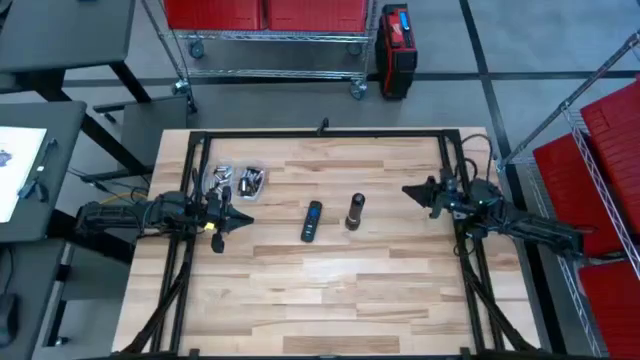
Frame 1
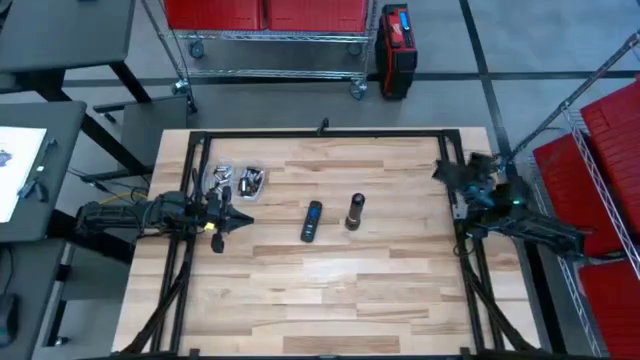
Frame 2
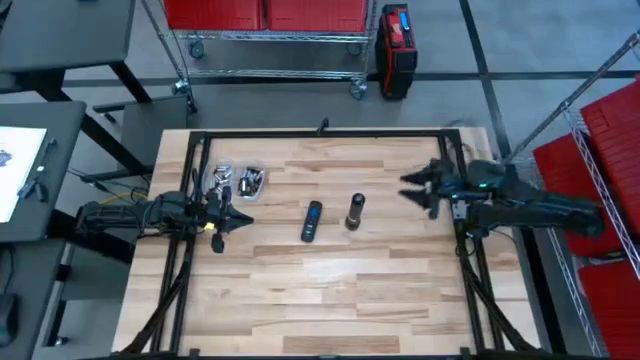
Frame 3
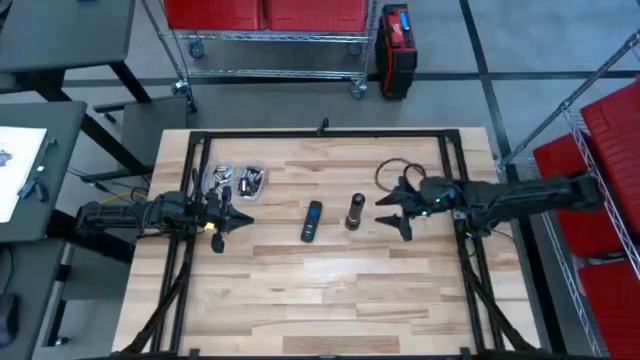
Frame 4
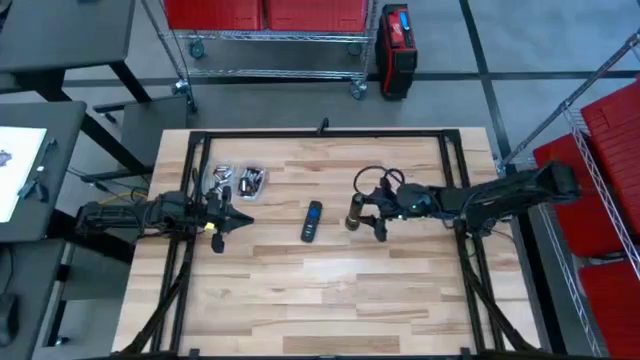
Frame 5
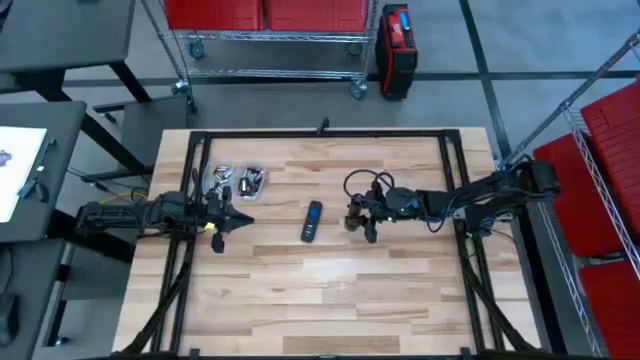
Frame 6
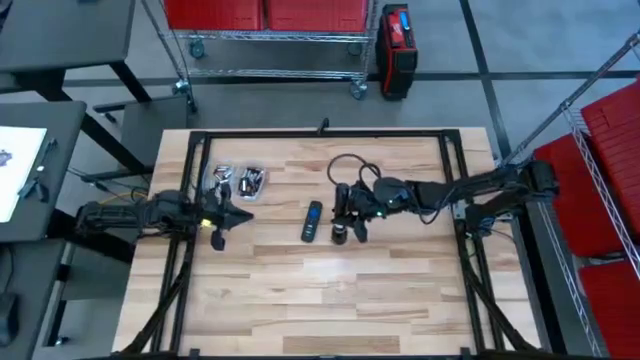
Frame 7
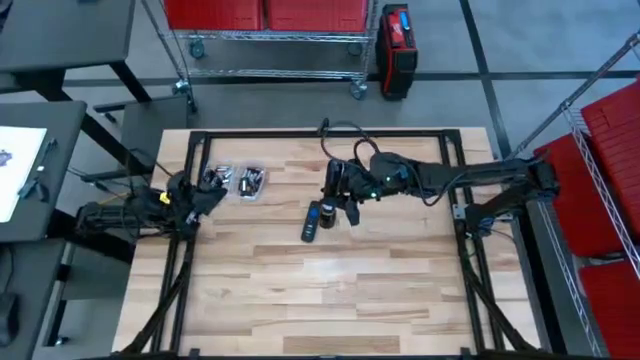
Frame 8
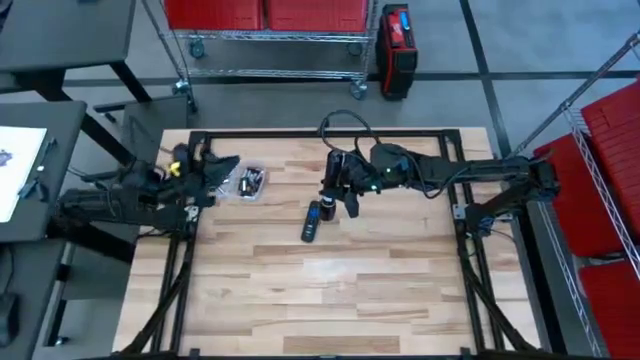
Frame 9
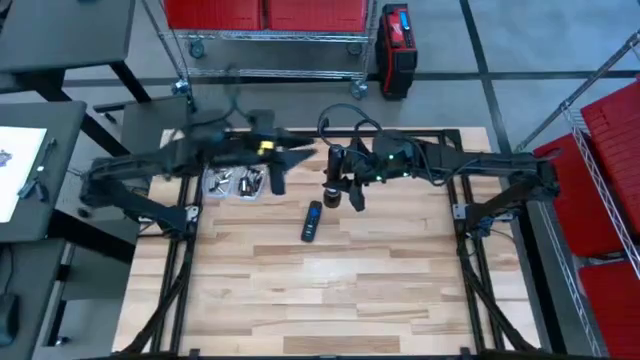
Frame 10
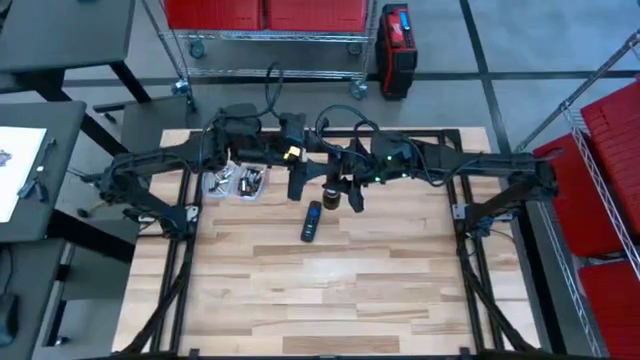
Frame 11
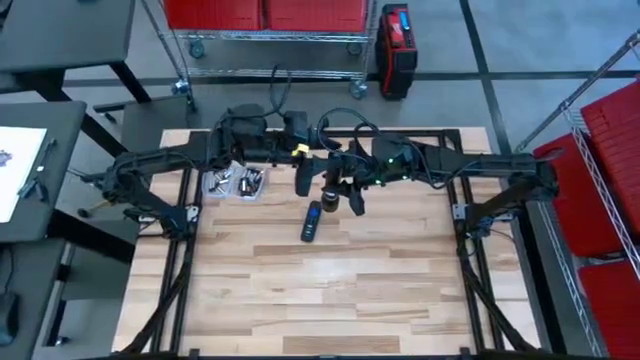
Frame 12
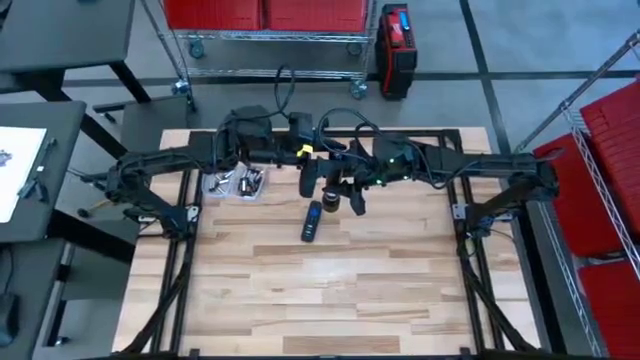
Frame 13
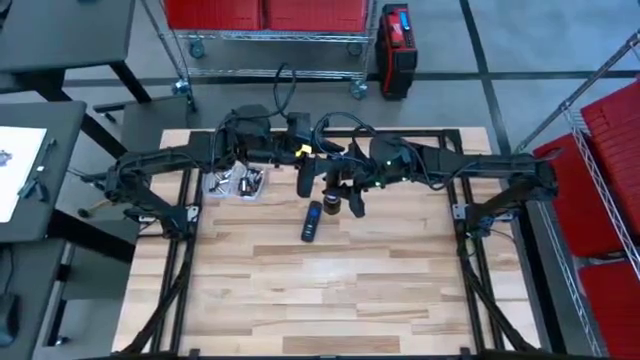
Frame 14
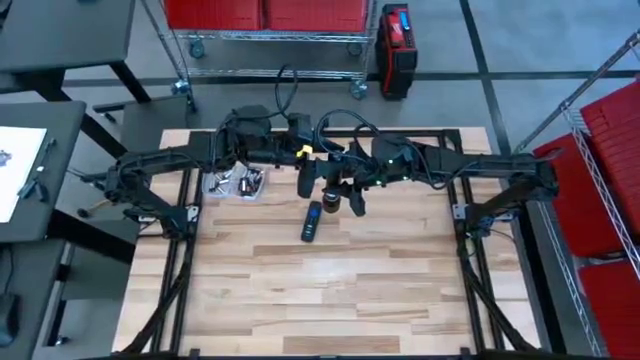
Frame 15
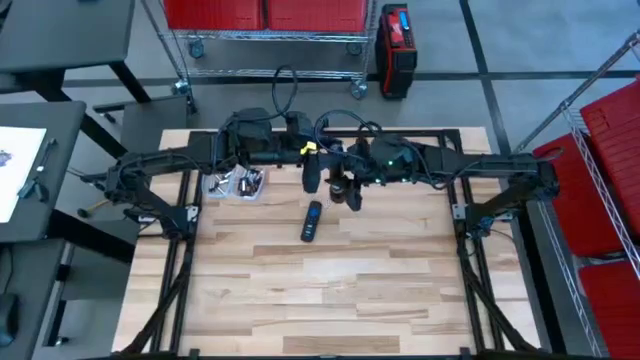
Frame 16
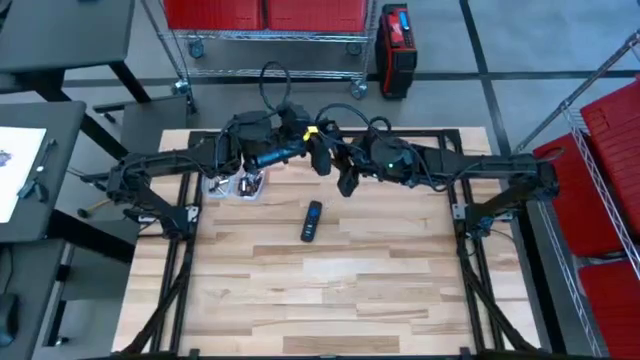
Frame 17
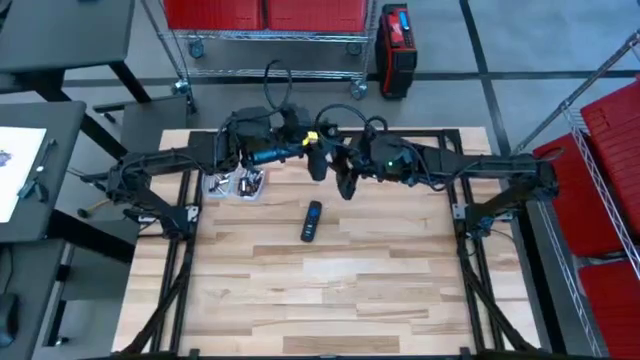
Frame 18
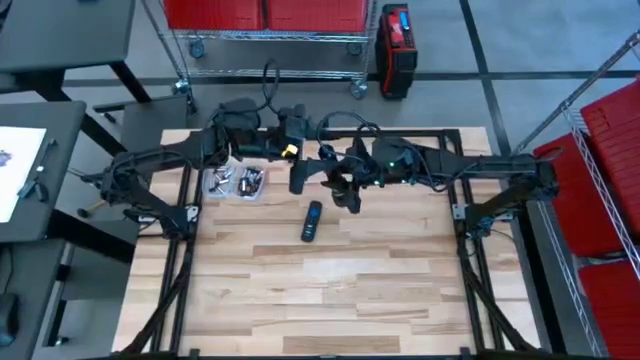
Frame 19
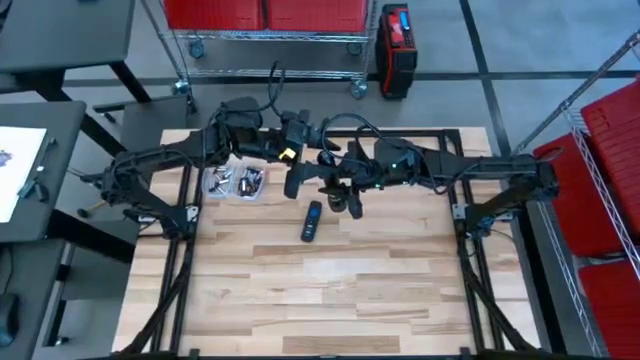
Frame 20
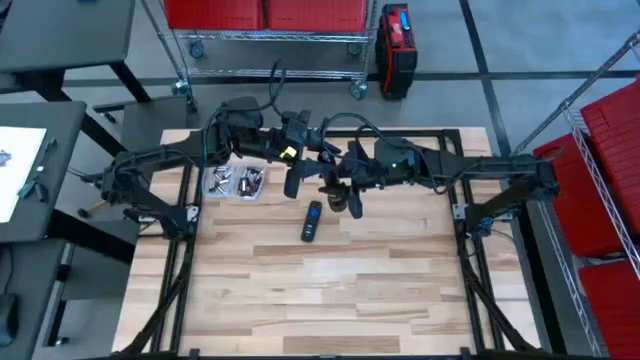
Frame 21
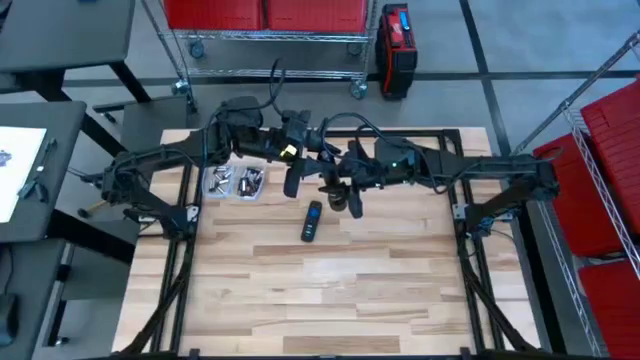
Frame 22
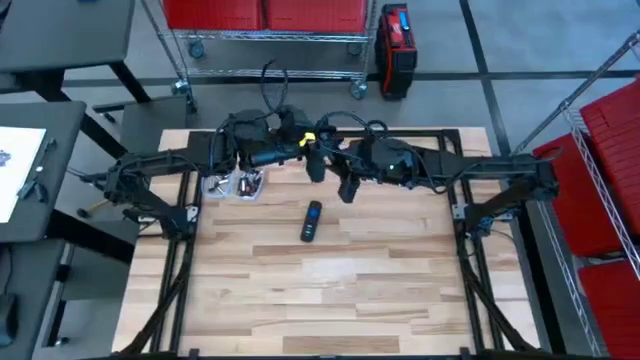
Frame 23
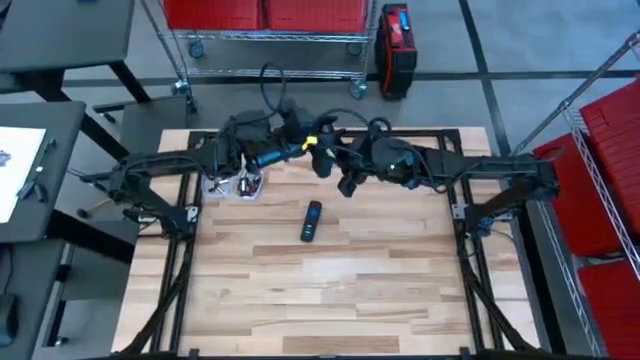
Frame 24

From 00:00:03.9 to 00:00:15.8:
Task: Insert battery
Open the flashlight's battery compartment

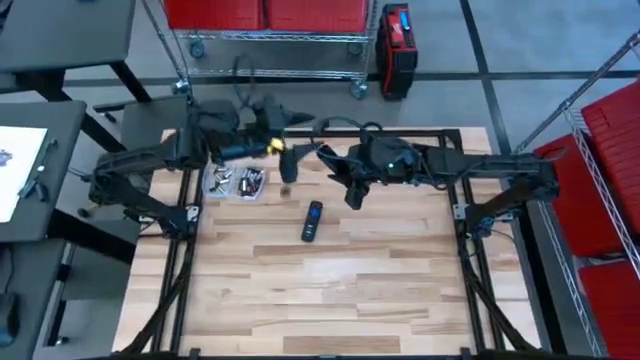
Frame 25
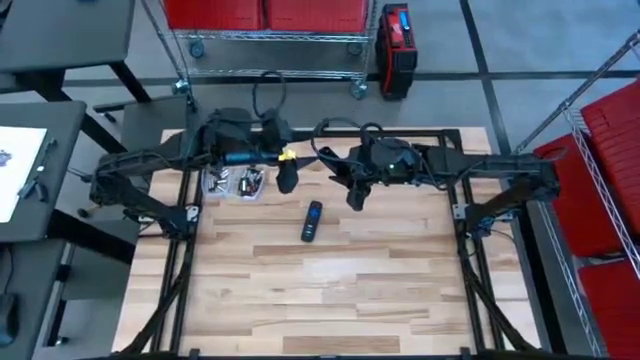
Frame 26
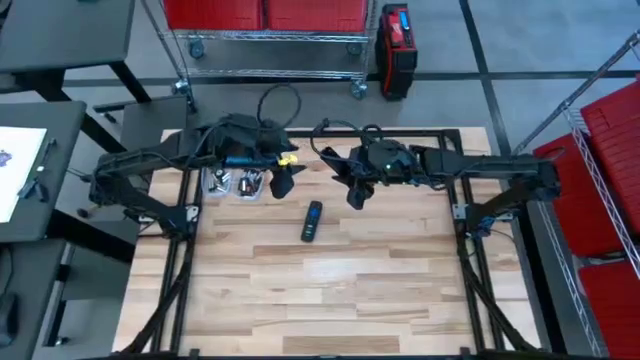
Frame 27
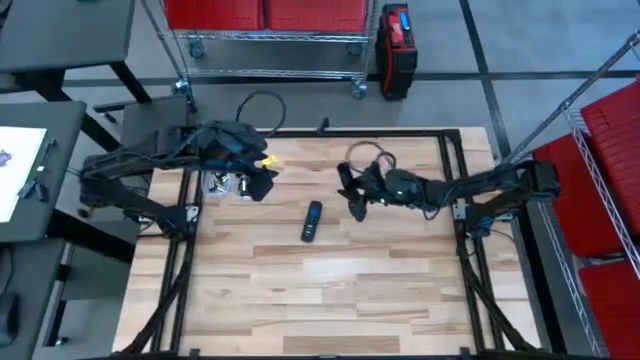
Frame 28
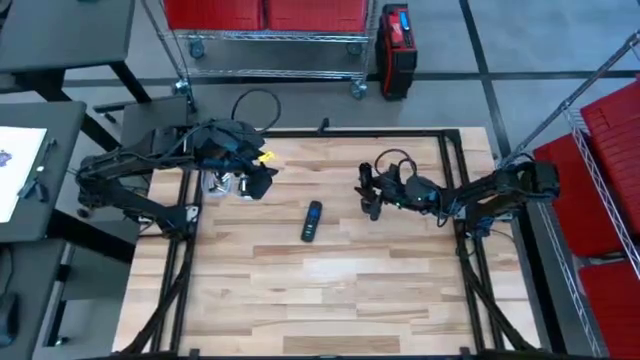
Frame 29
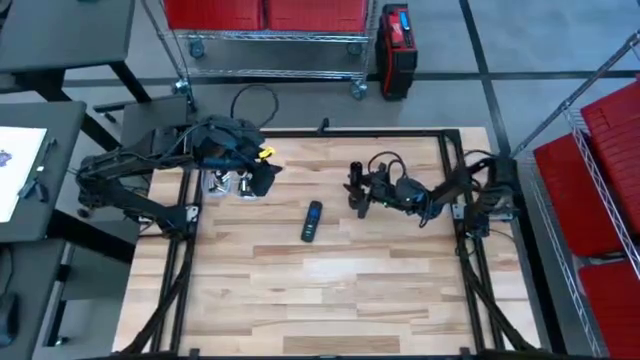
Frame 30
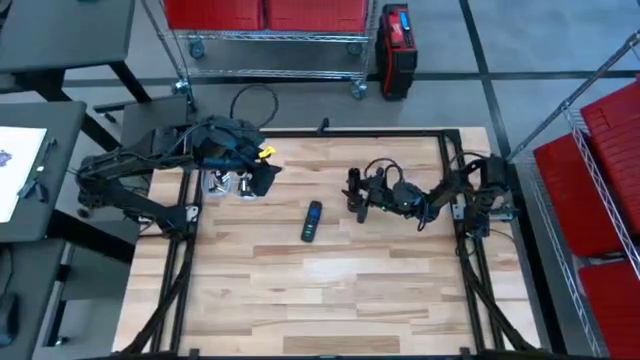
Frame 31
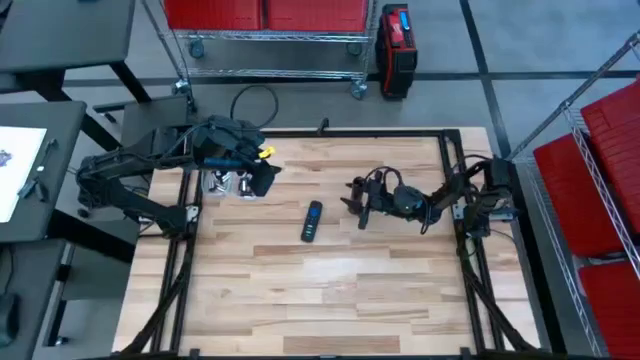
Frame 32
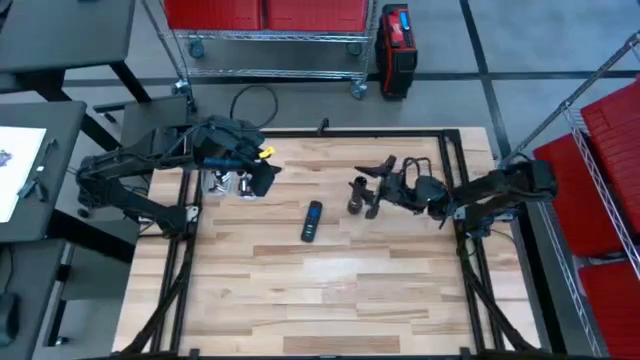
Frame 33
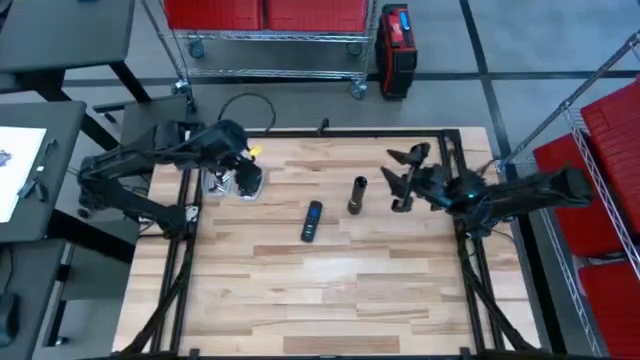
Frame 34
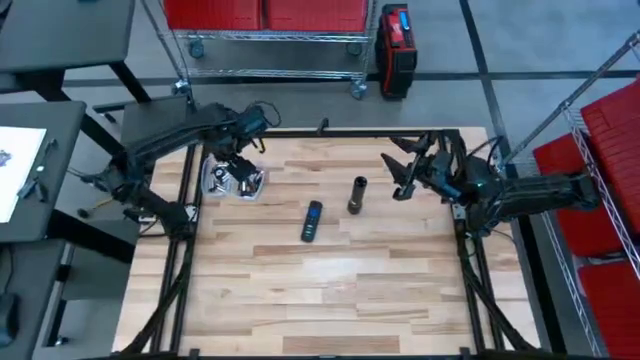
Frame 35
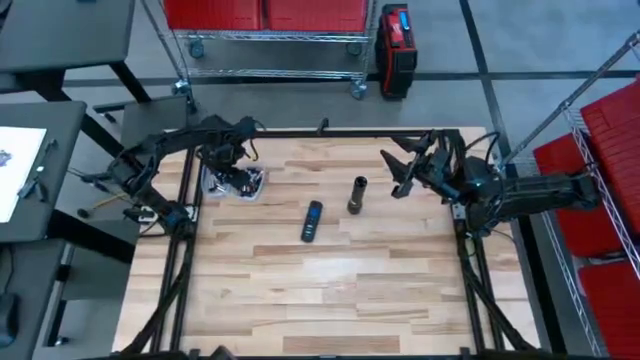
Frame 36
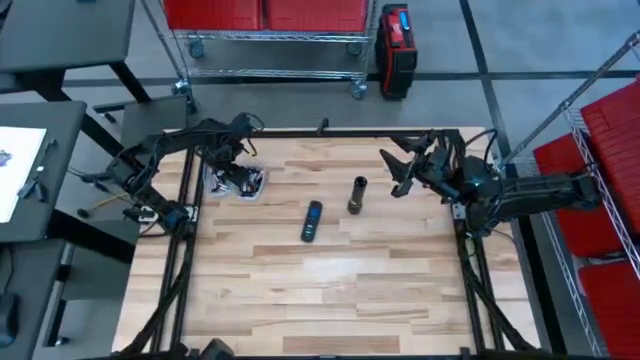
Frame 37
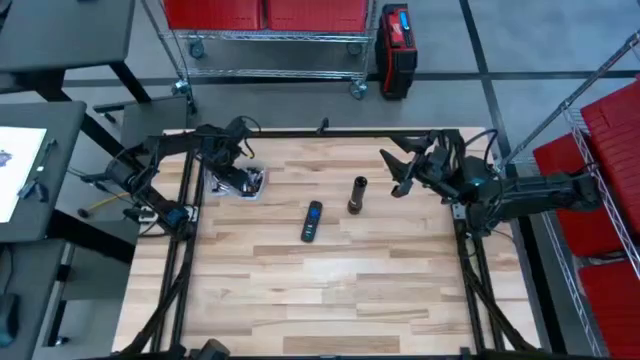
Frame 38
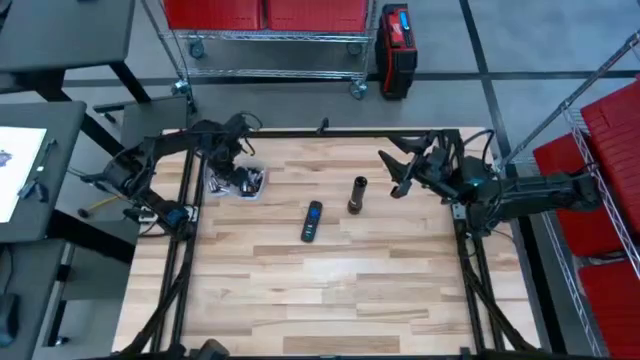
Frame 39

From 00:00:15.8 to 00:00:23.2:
Move the flashlight lid to the center

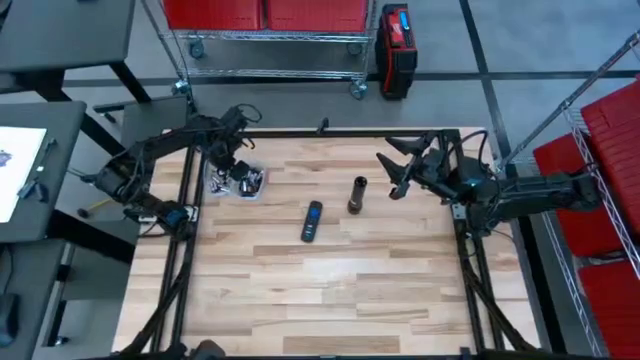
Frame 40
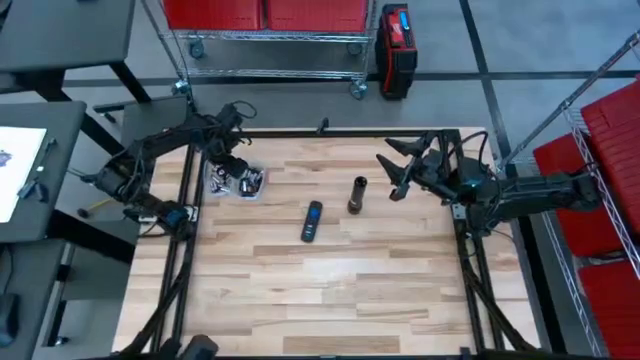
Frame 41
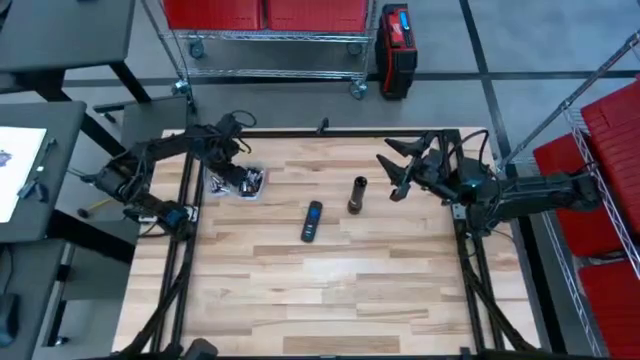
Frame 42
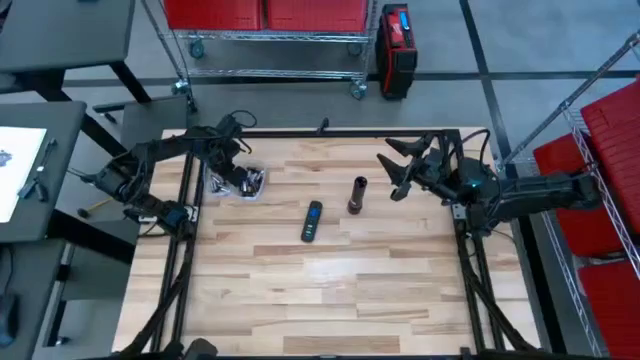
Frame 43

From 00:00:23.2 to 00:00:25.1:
Move the flashlight lid to the center

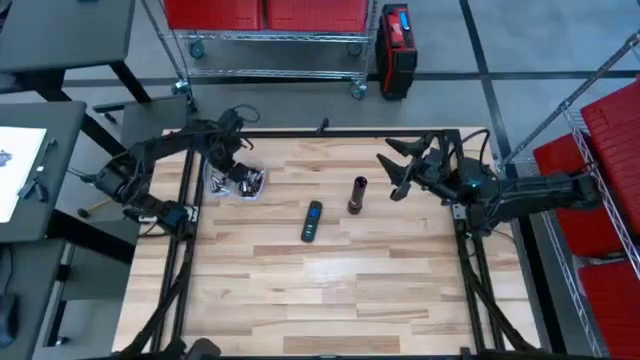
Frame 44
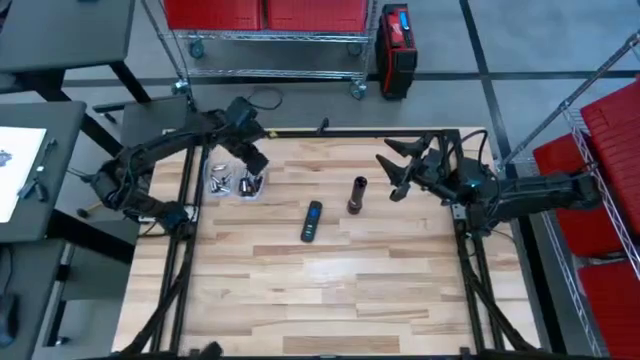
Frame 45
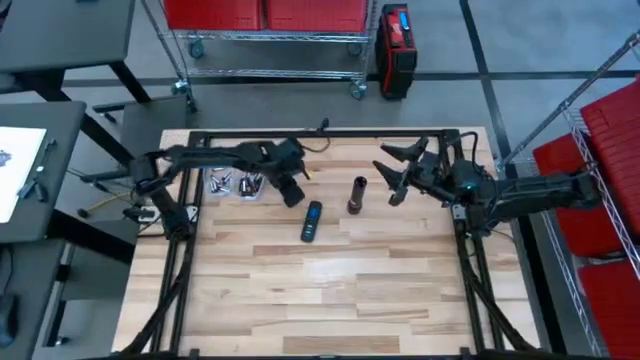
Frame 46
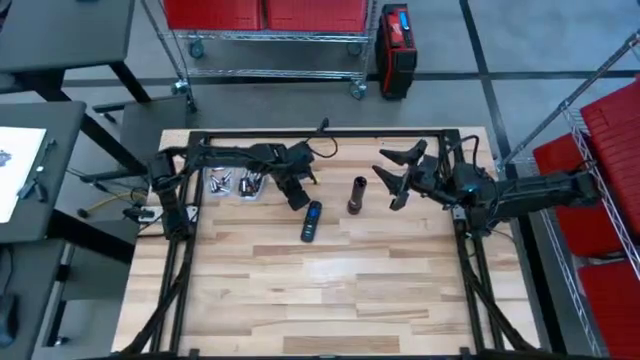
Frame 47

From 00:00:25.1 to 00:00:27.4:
Move the flashlight lid to the center
